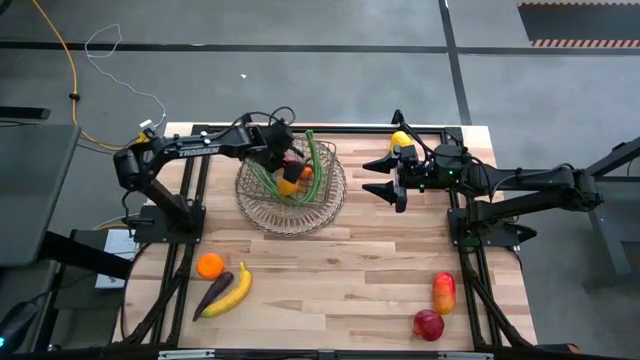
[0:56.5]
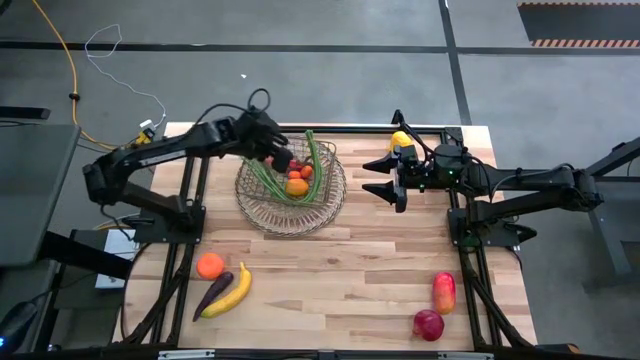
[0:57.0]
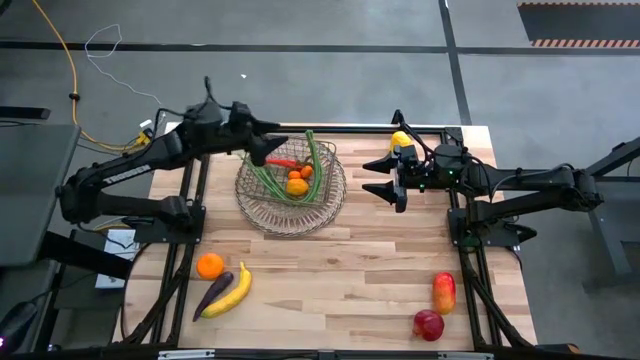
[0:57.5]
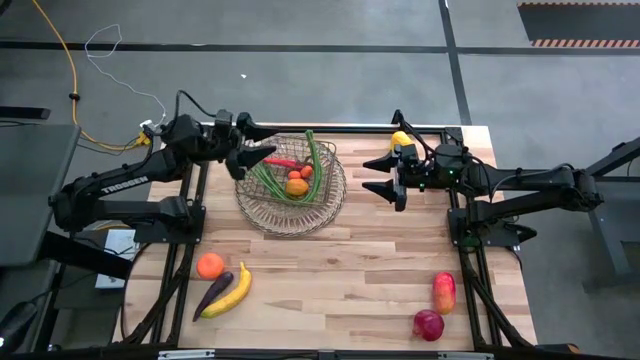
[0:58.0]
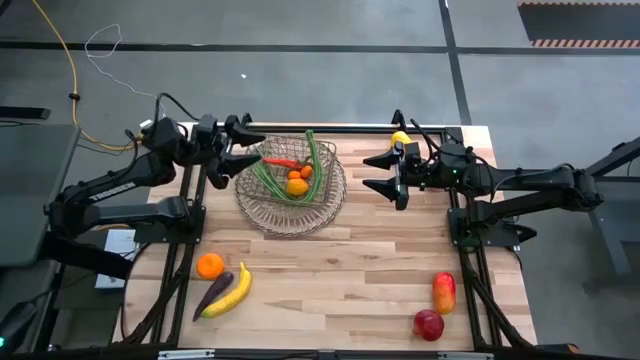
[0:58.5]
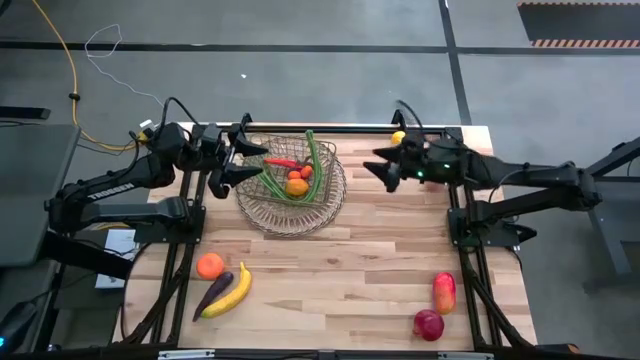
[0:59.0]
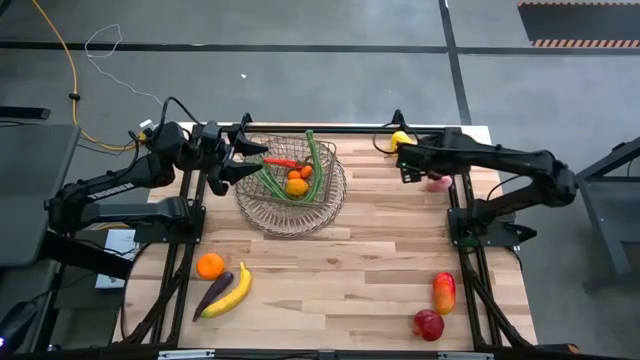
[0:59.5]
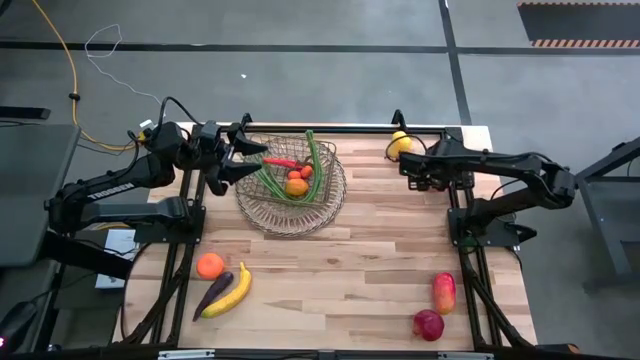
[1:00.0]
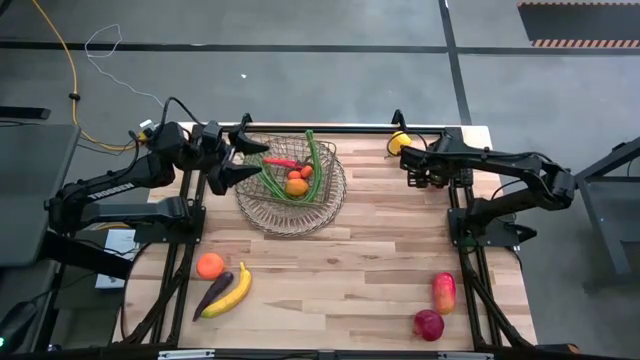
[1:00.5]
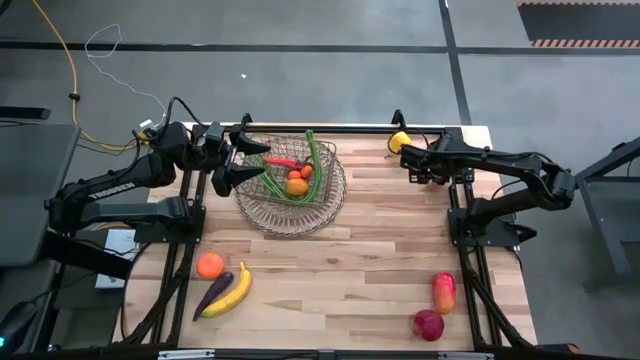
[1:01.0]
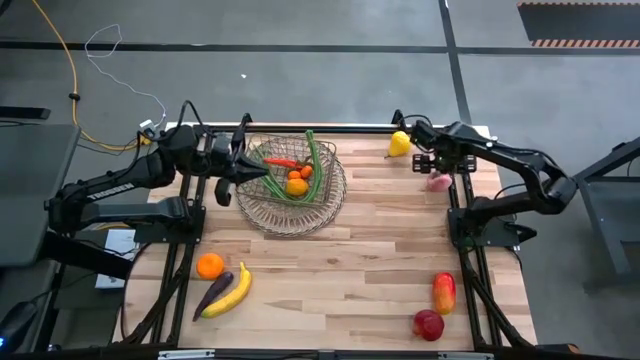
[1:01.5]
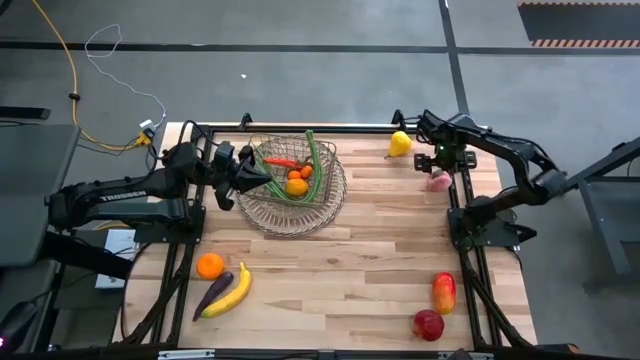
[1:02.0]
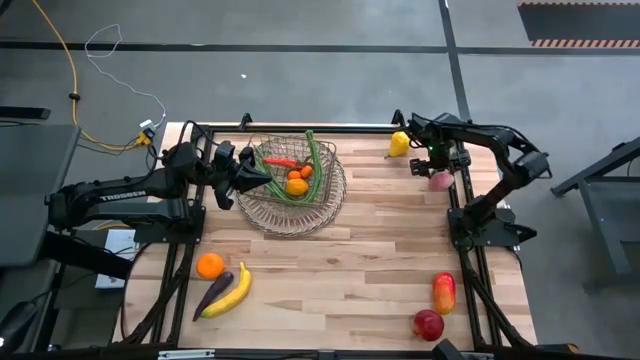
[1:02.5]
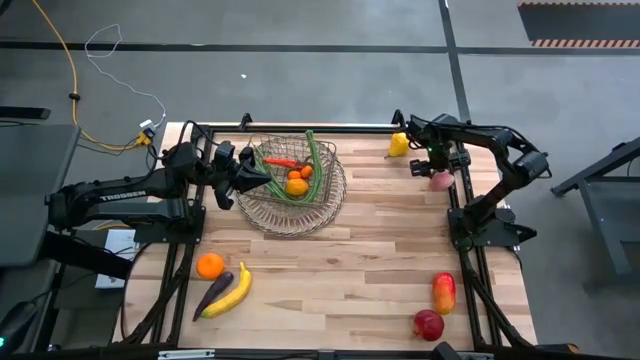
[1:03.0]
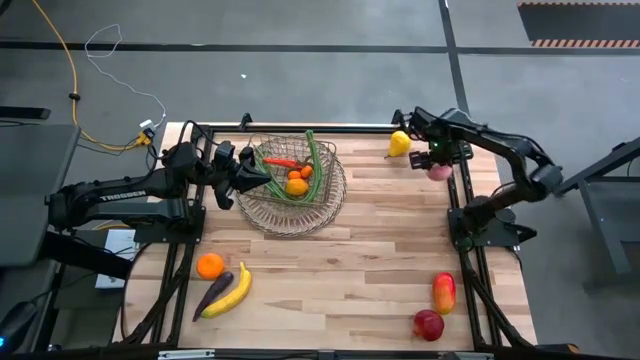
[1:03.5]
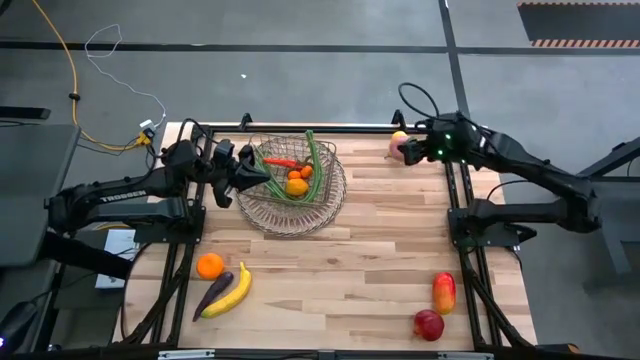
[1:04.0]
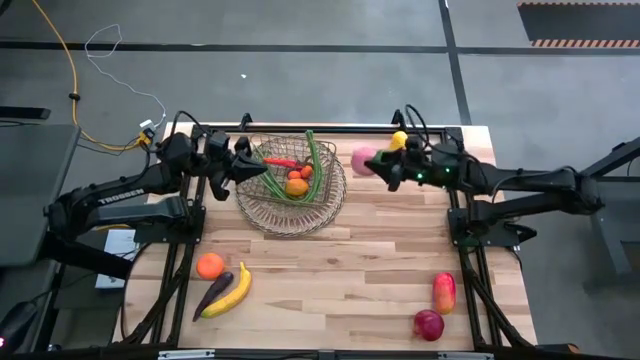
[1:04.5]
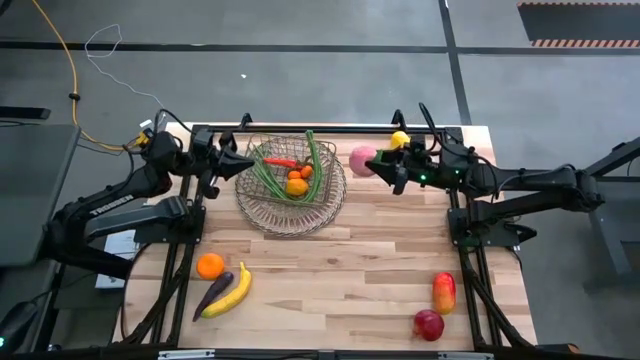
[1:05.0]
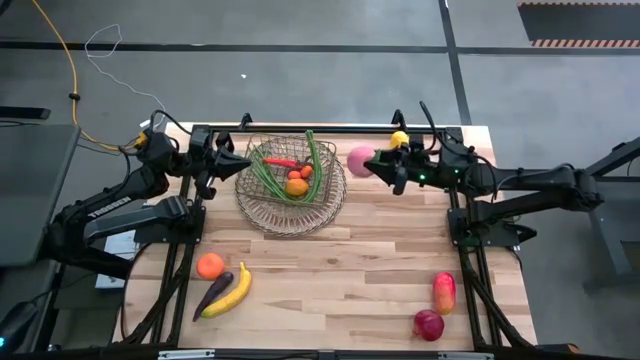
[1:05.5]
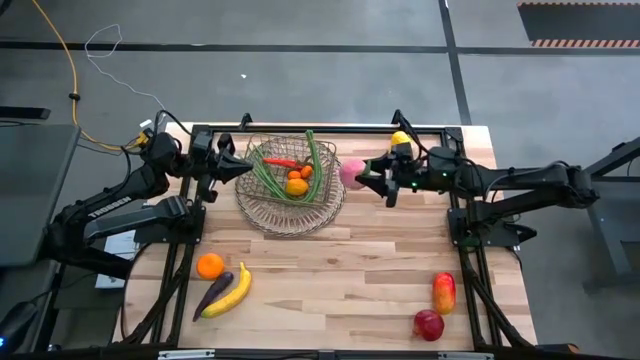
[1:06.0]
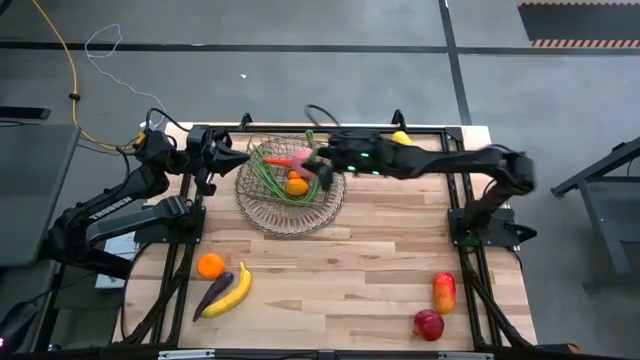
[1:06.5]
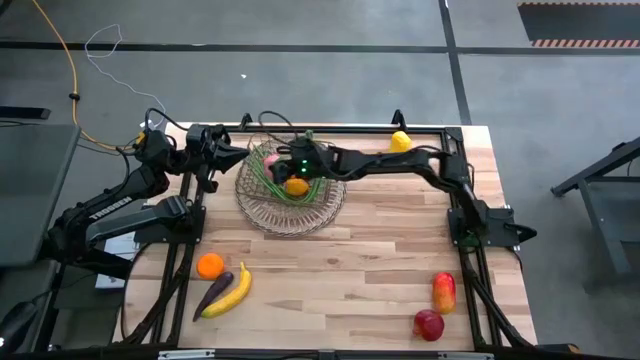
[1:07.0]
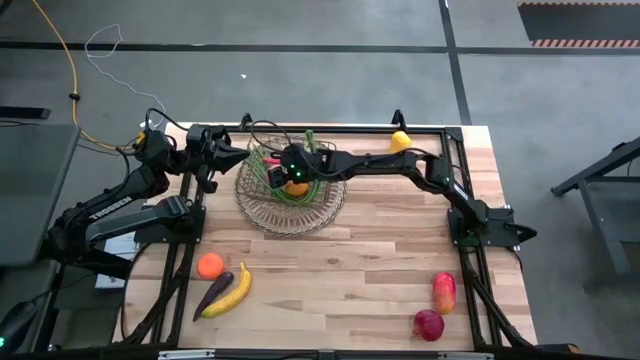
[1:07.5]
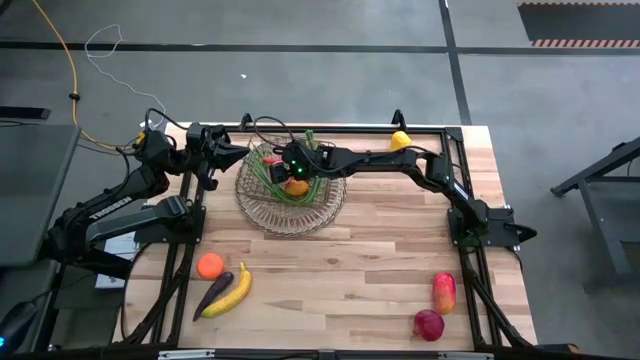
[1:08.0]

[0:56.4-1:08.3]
Task: Build produce basket
Put the pink peach into the wire basket

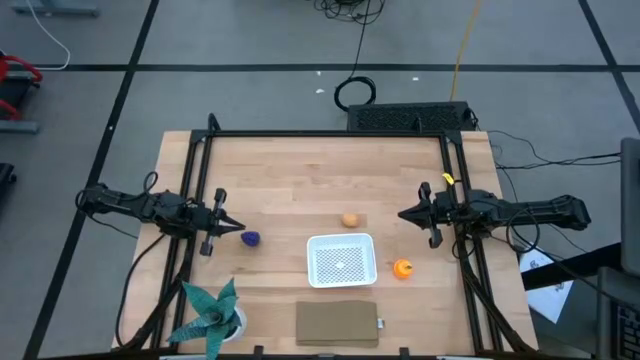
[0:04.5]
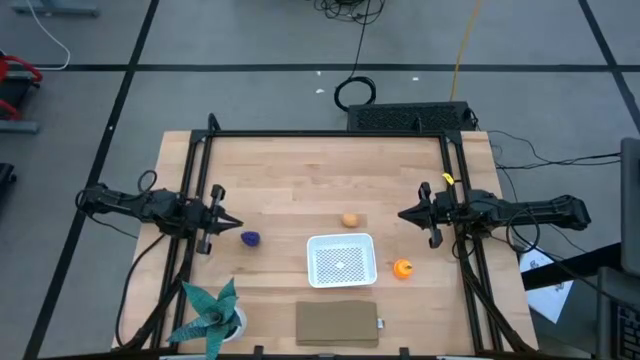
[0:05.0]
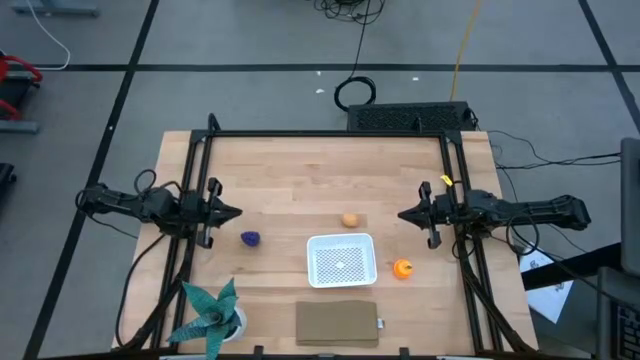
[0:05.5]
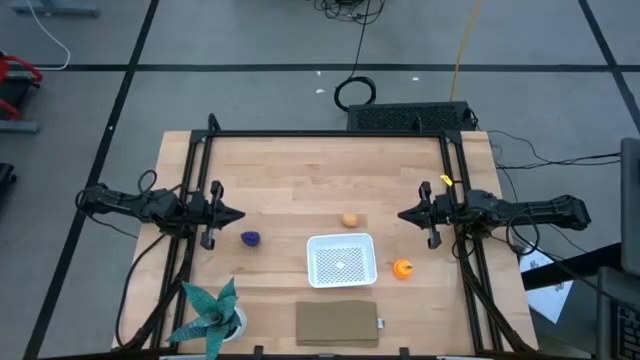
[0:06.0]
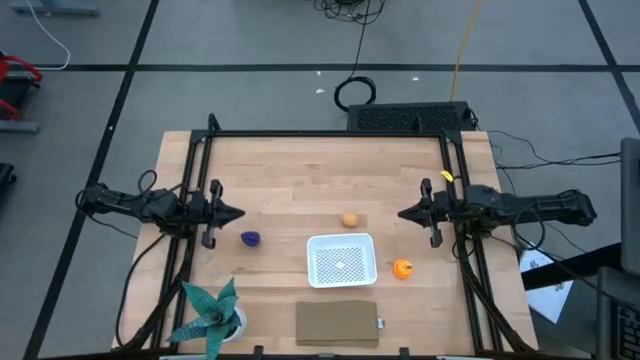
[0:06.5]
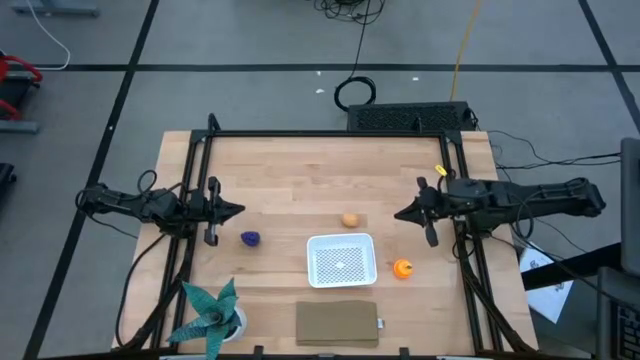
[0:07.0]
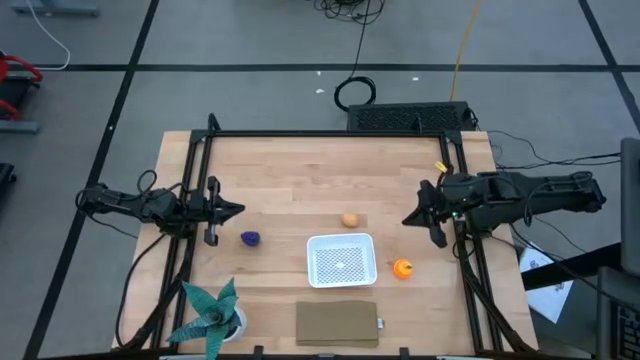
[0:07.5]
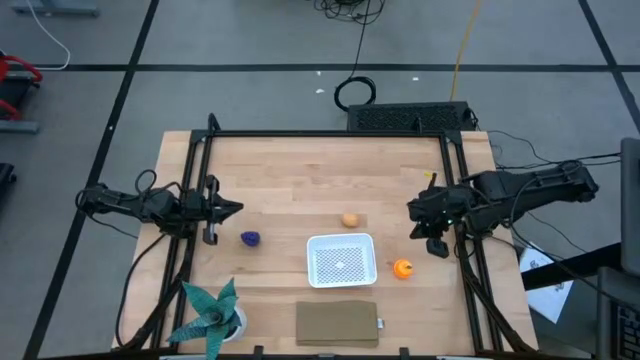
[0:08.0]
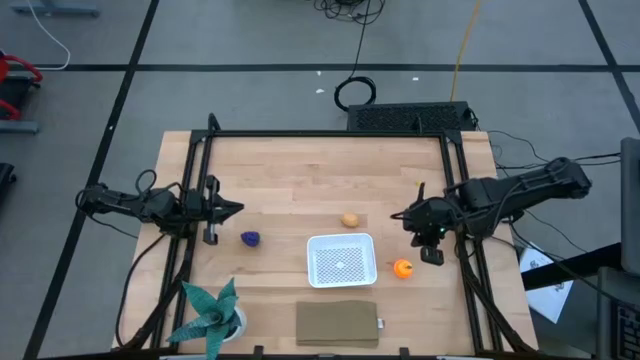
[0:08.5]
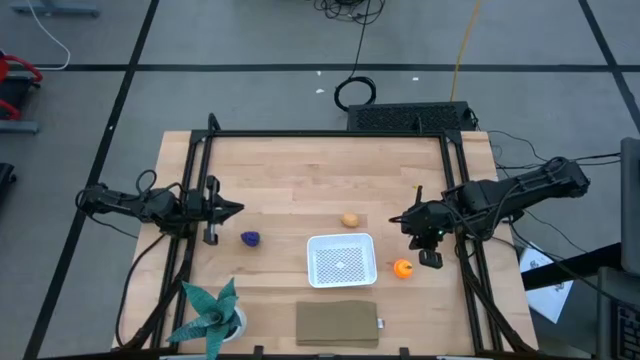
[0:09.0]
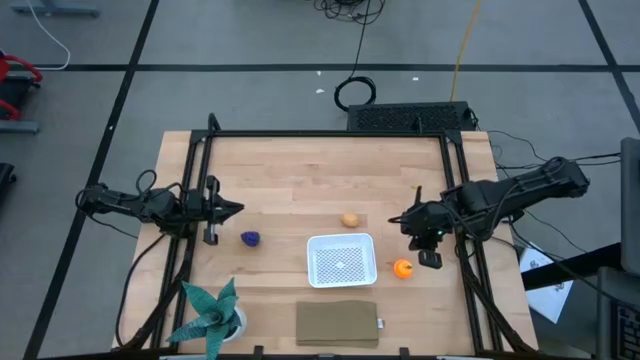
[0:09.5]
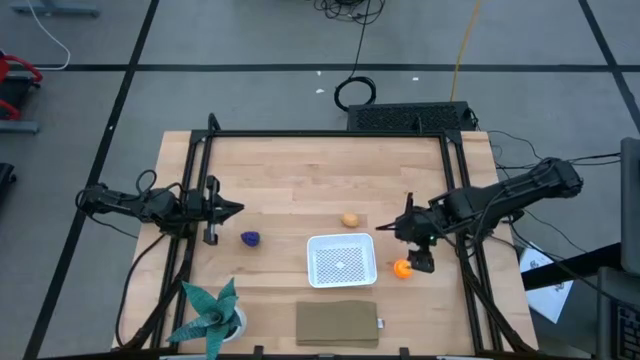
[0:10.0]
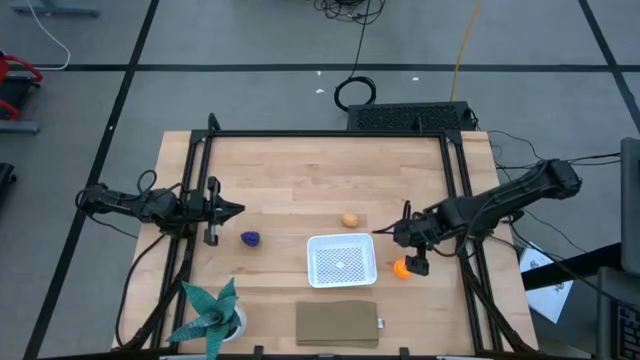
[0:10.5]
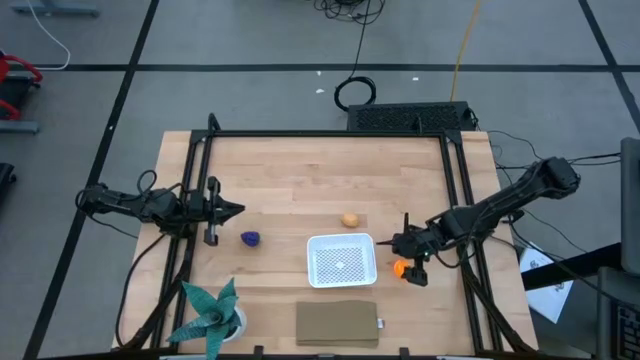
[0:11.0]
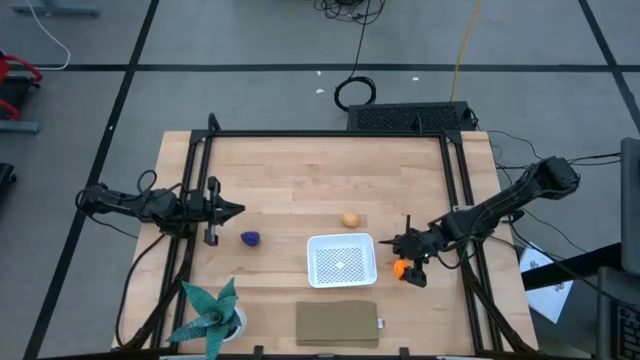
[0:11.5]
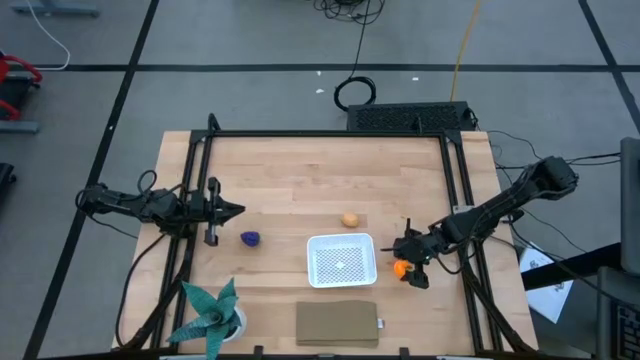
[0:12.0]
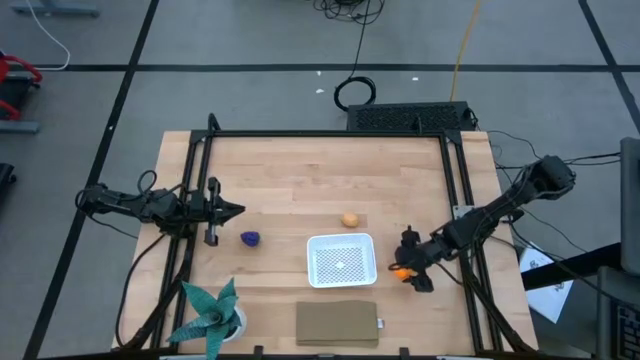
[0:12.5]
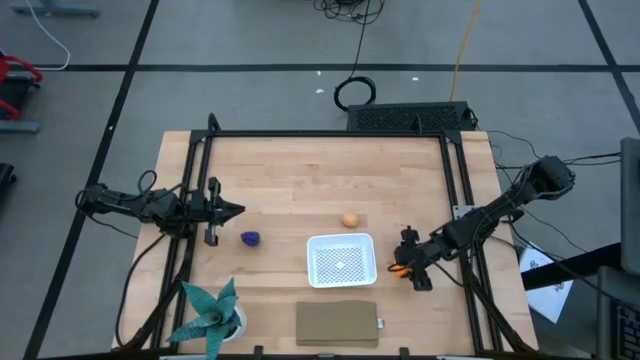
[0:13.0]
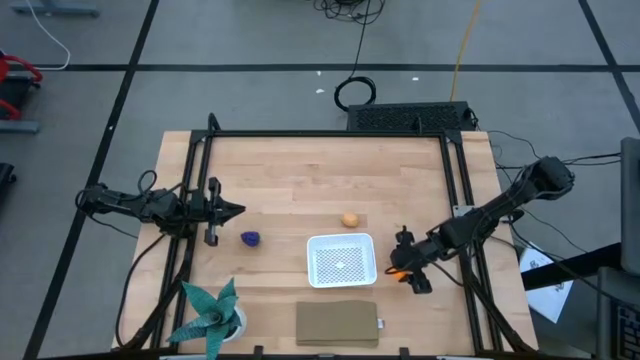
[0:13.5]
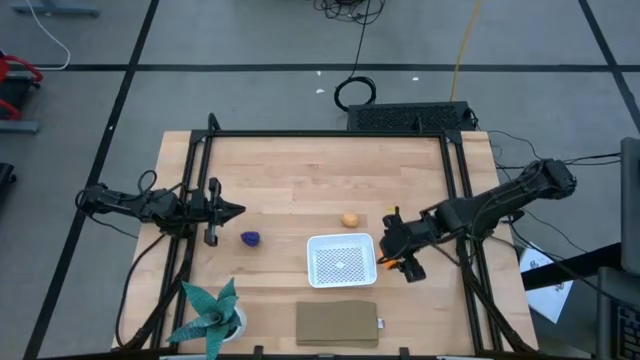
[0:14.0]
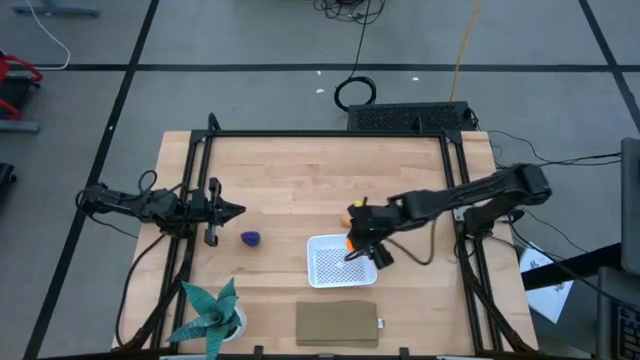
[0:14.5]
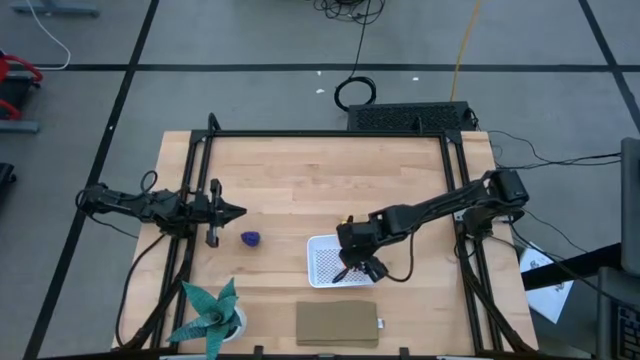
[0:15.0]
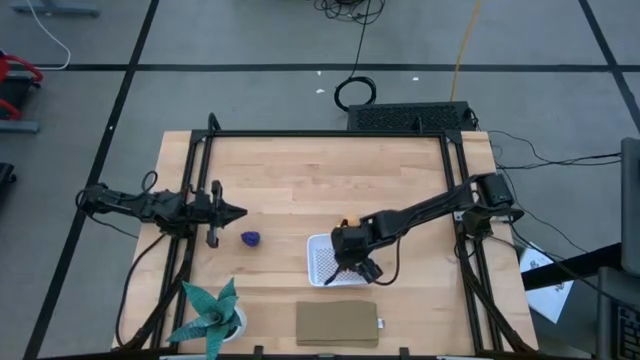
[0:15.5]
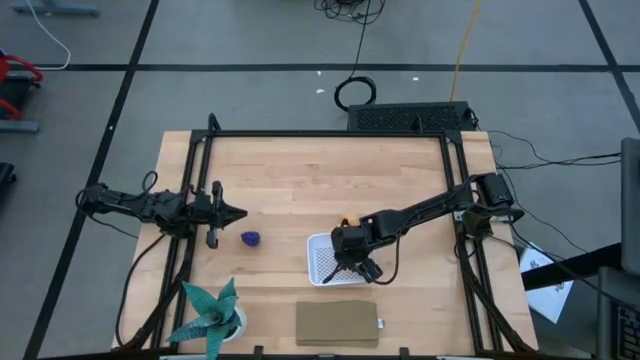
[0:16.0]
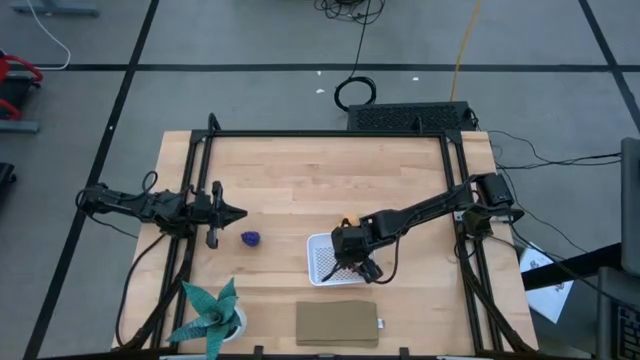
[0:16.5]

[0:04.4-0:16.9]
Task: Pick and placing Produce into tupperware
Put the orange into the white basket
